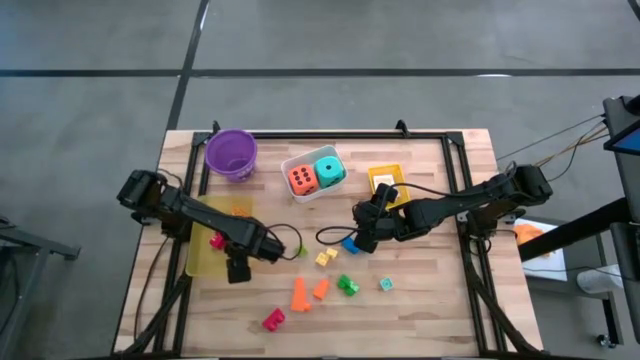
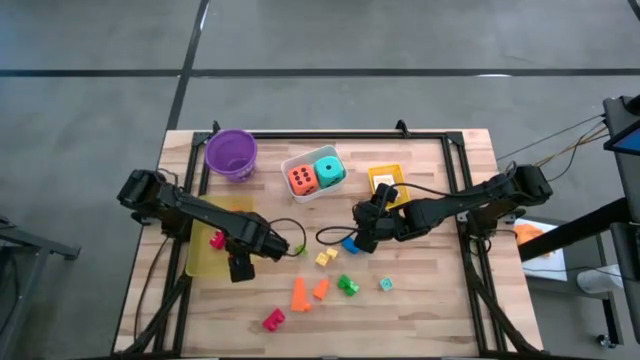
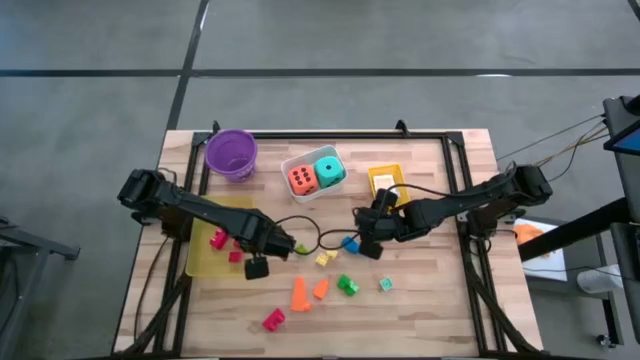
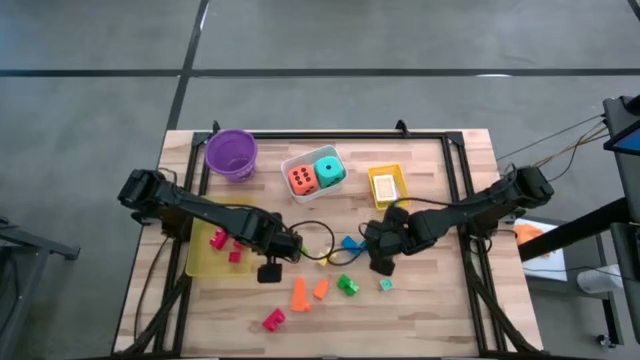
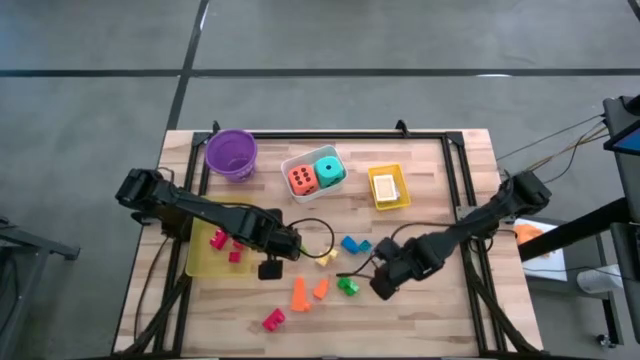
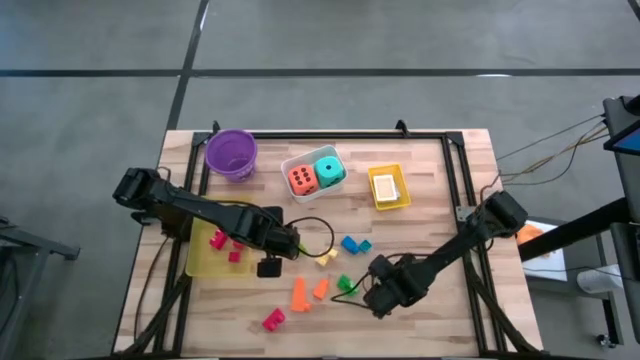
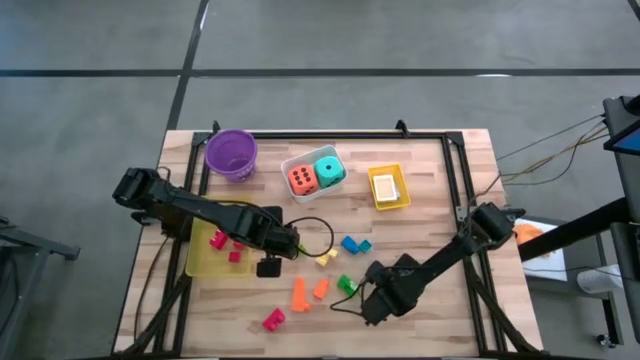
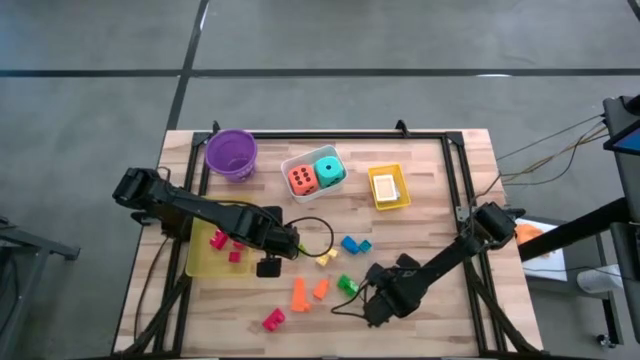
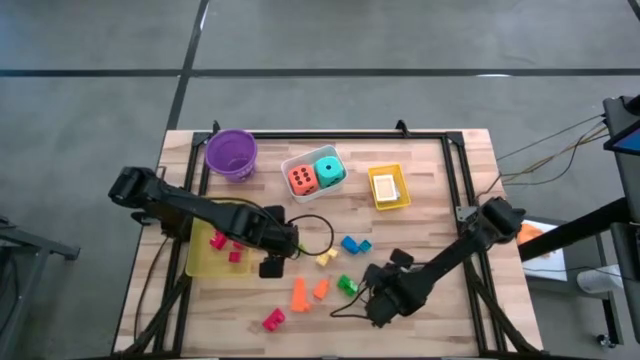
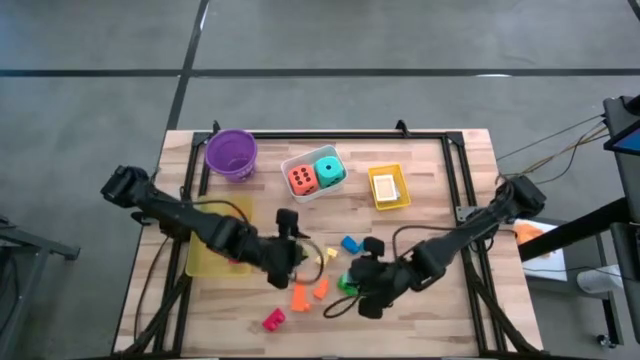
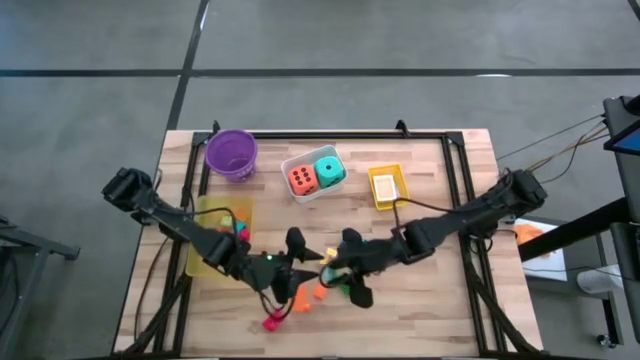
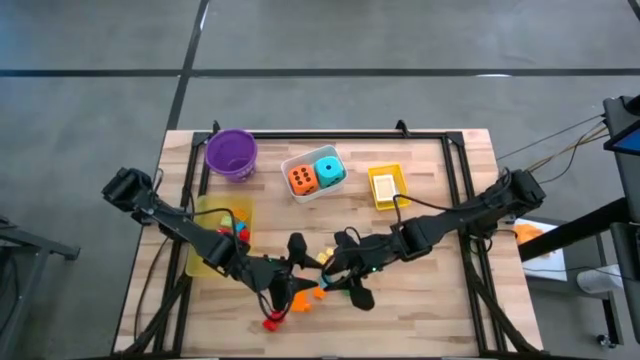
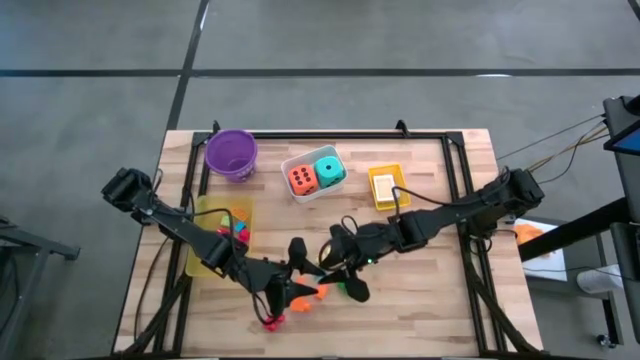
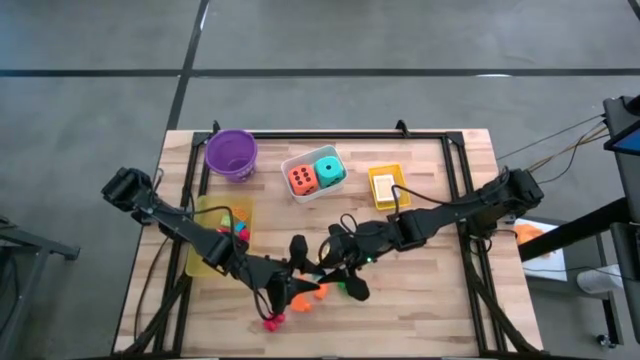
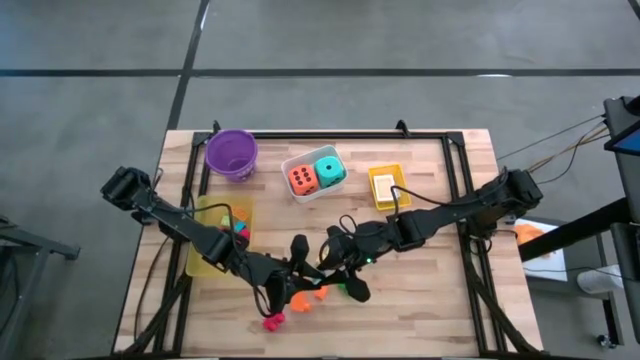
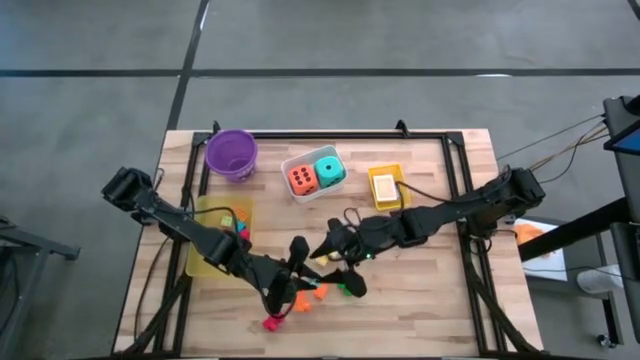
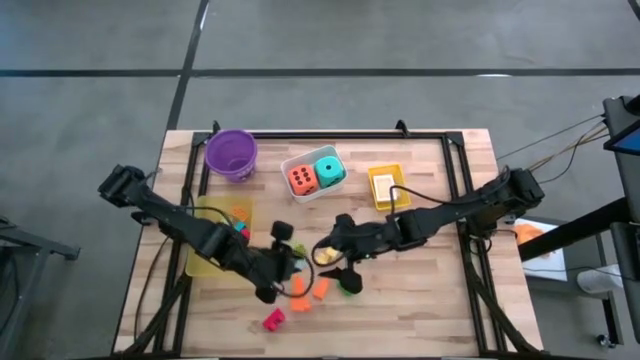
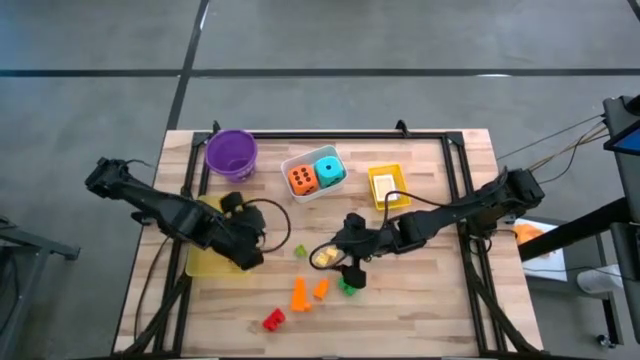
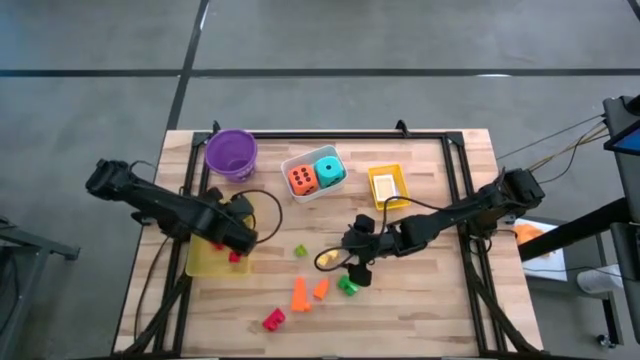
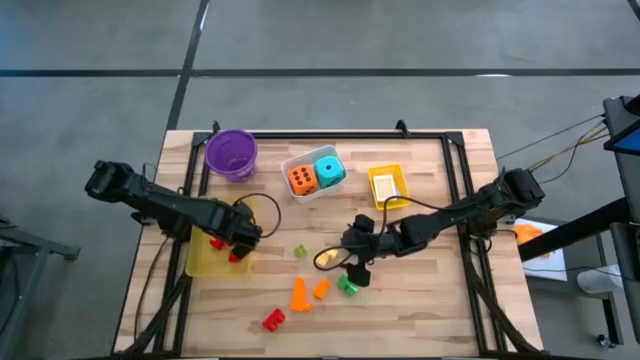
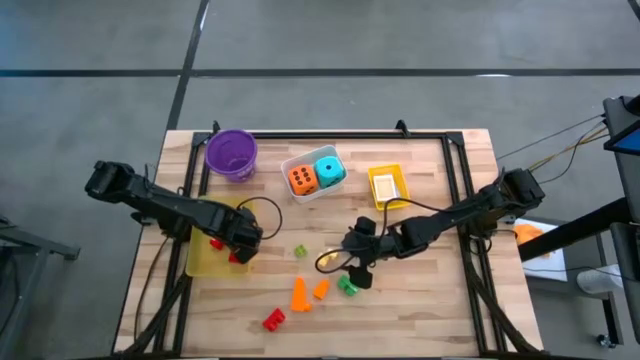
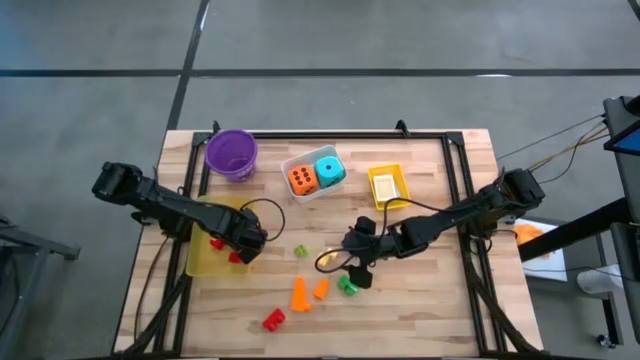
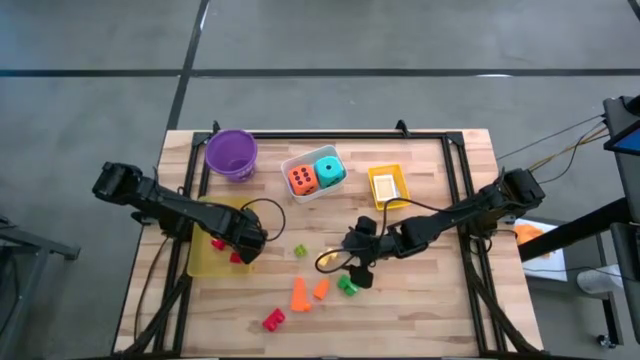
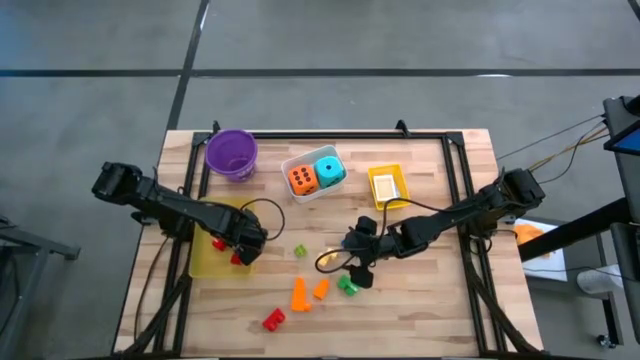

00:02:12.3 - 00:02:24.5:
Task: Pick & Place Toys
Put the light blue game piece into the light yellow bin

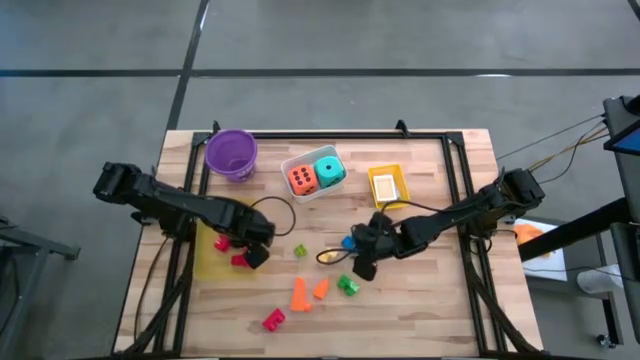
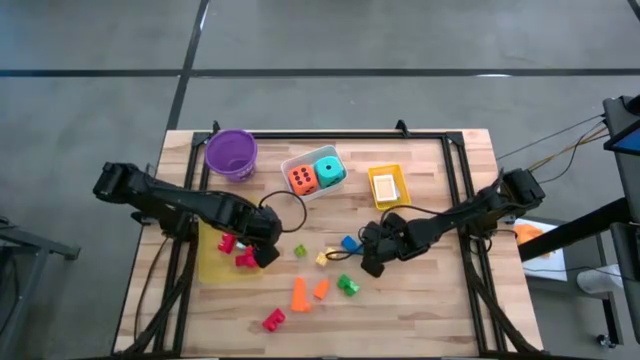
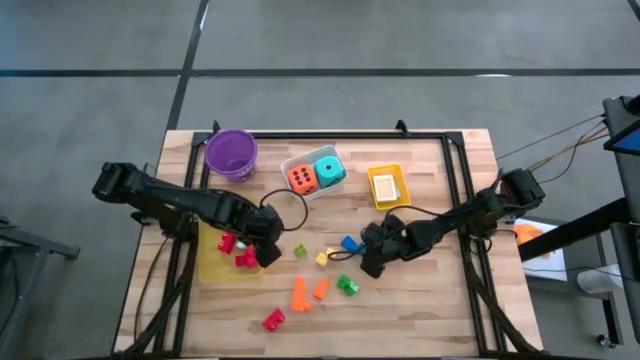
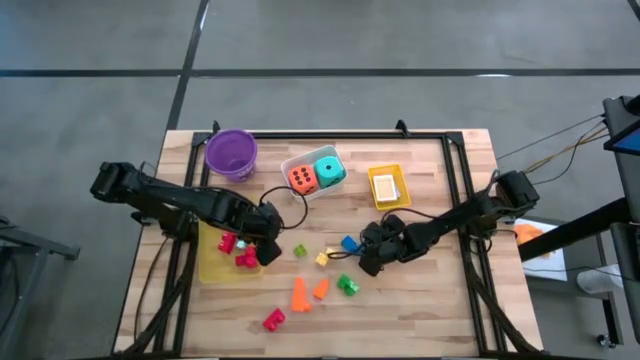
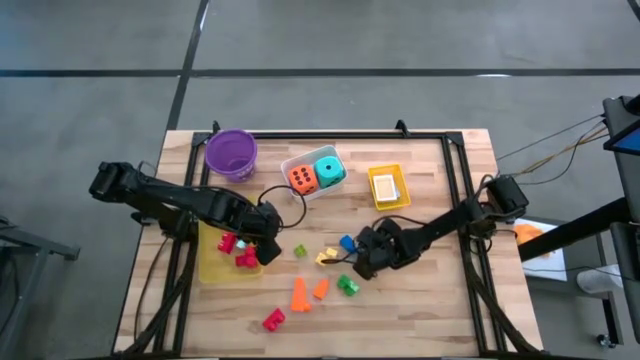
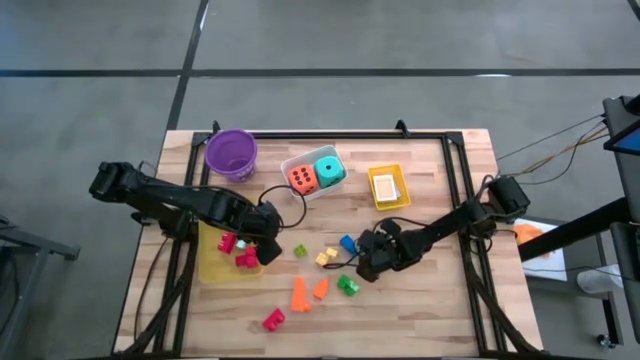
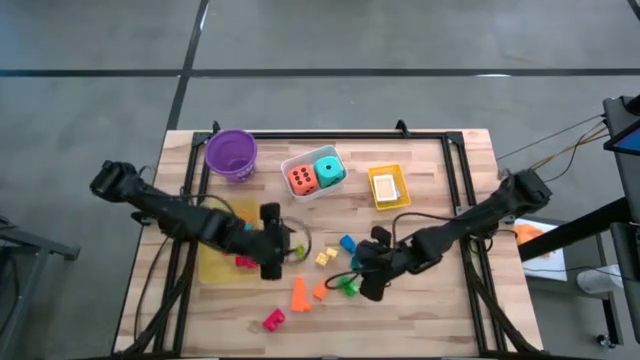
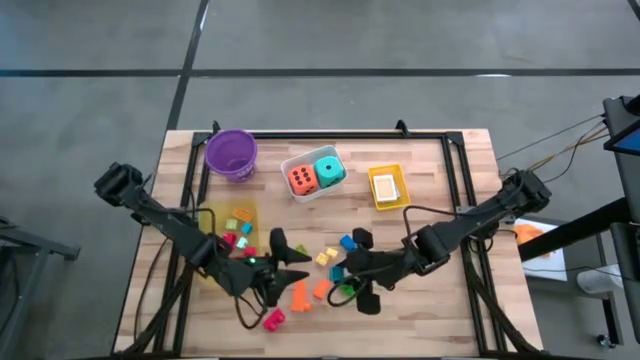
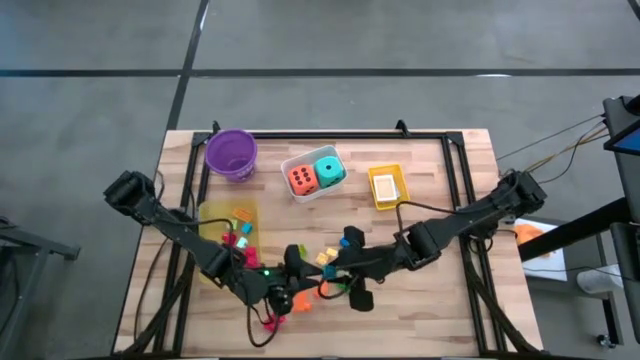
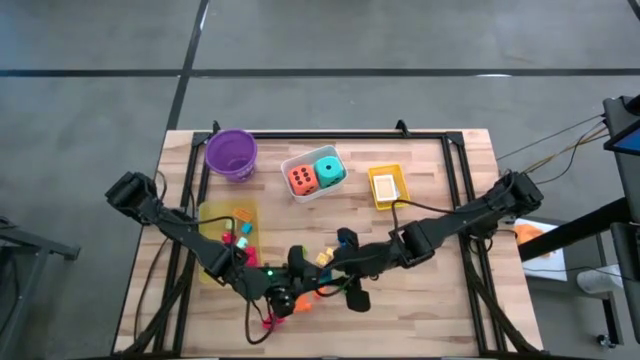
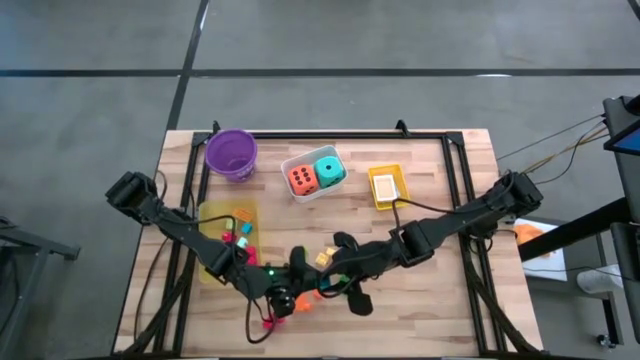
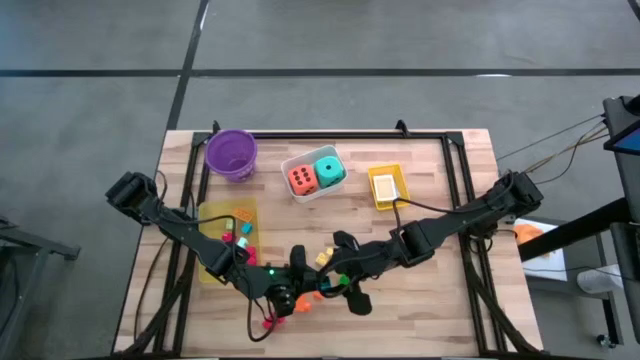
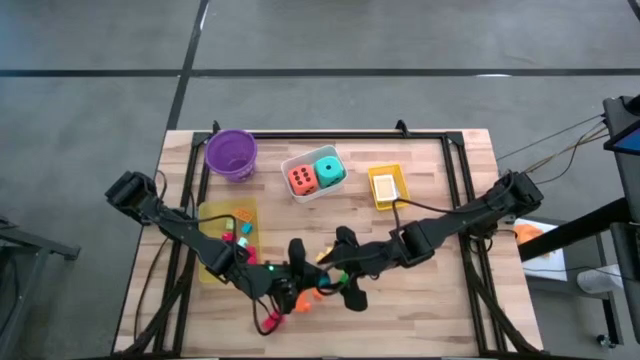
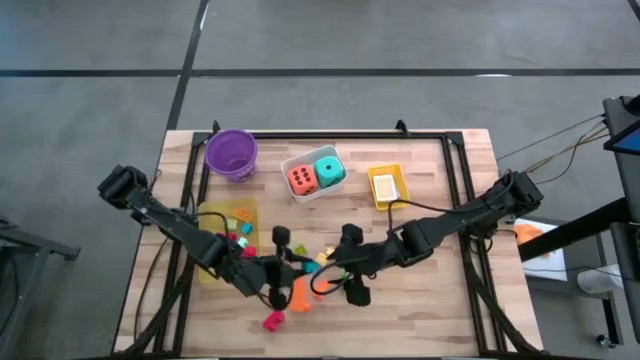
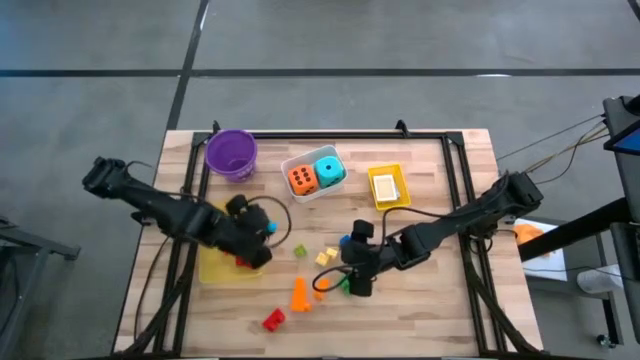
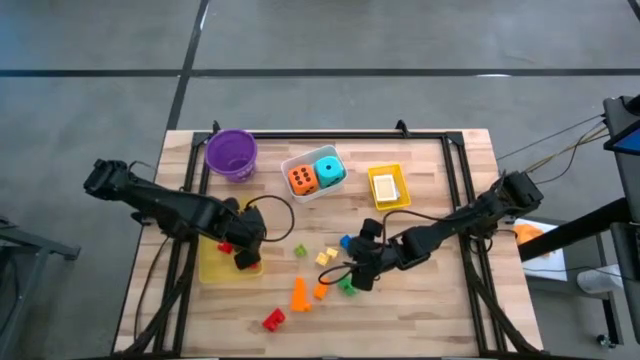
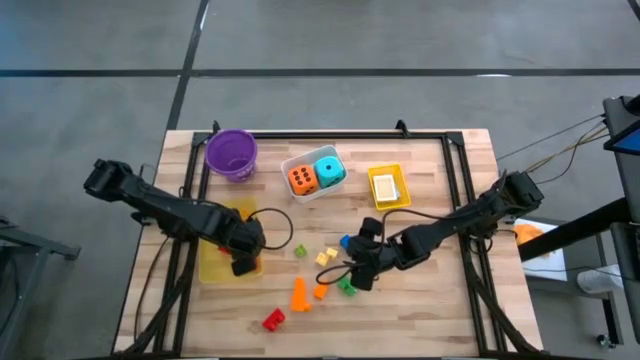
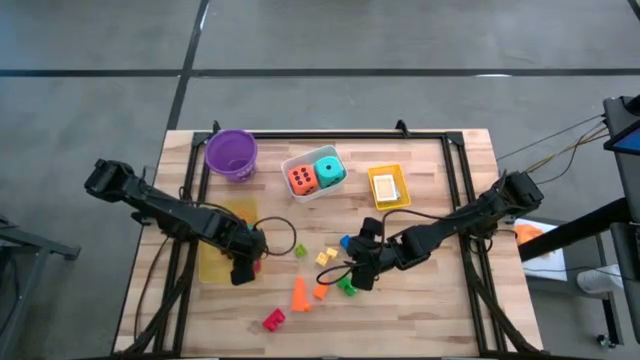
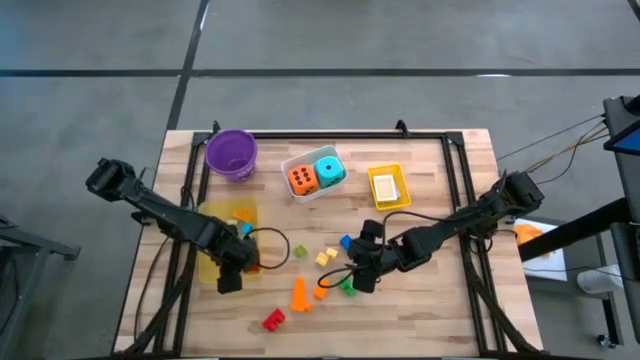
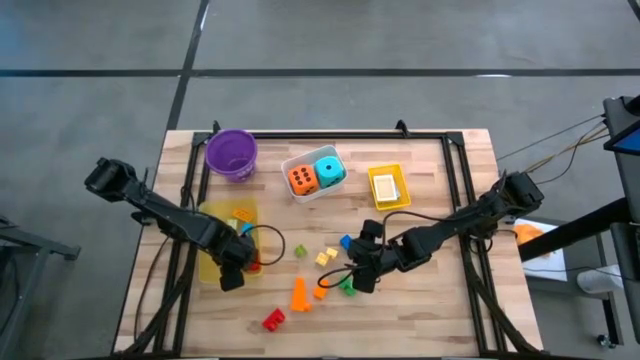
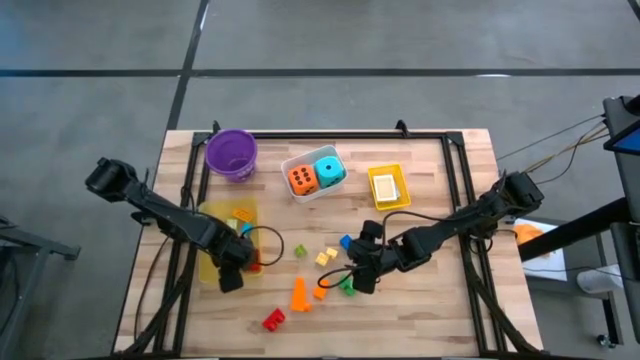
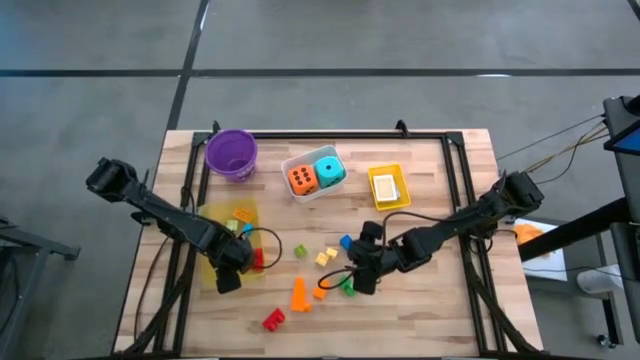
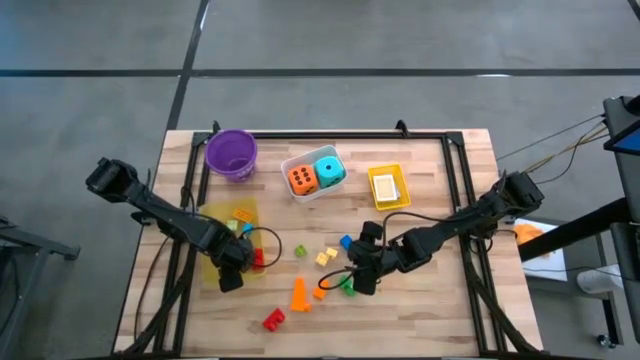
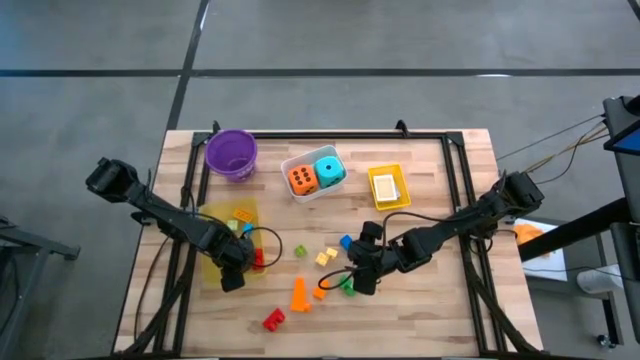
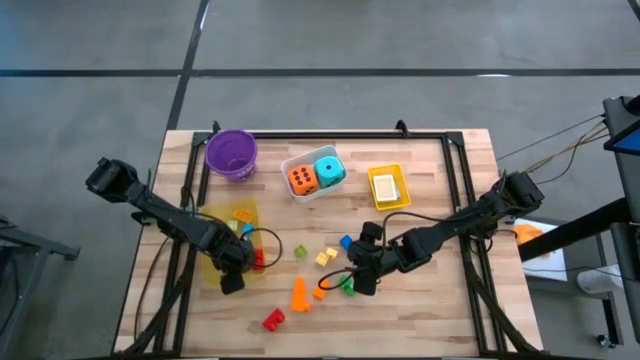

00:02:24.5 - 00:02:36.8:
Put the light blue game piece into the light yellow bin
